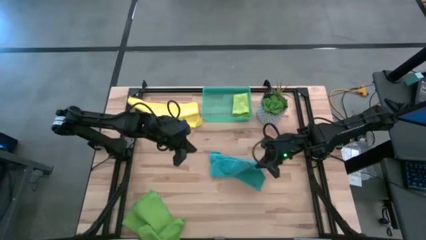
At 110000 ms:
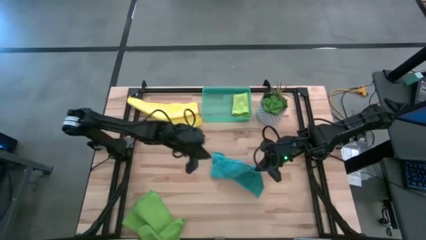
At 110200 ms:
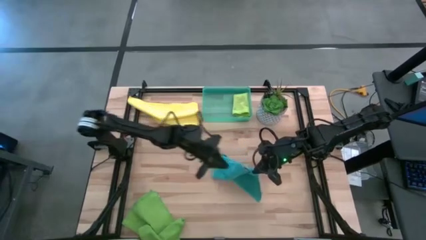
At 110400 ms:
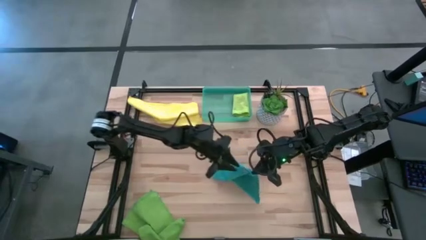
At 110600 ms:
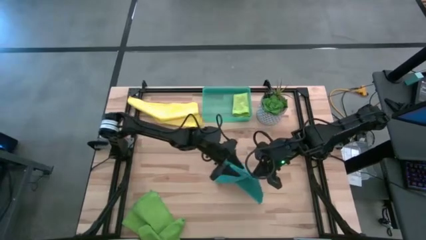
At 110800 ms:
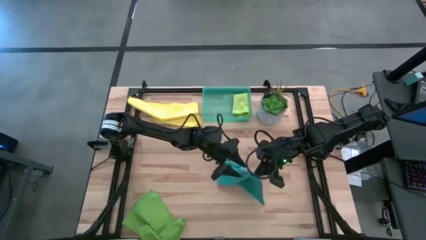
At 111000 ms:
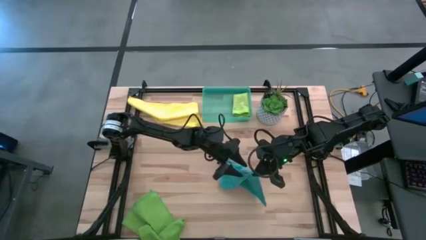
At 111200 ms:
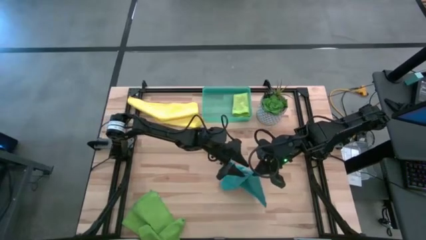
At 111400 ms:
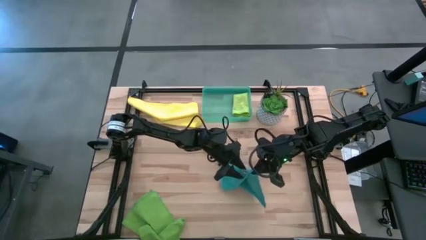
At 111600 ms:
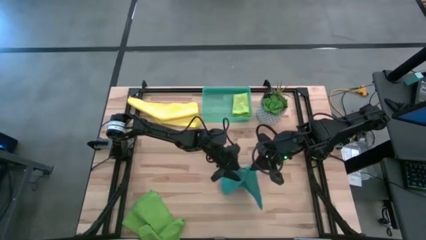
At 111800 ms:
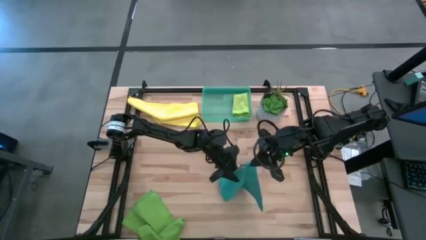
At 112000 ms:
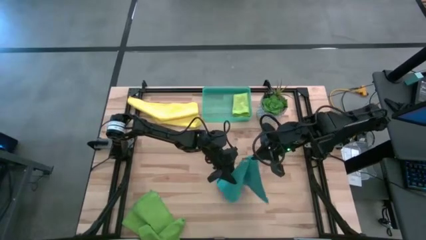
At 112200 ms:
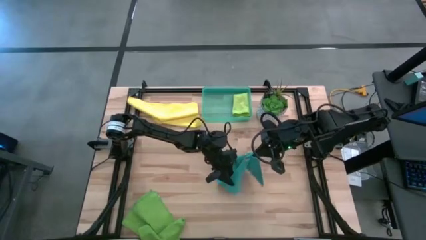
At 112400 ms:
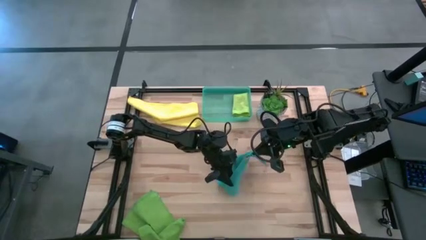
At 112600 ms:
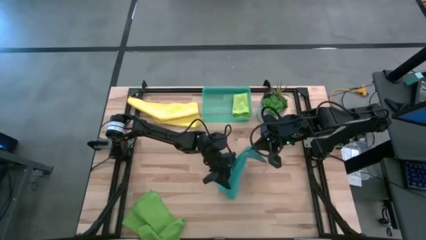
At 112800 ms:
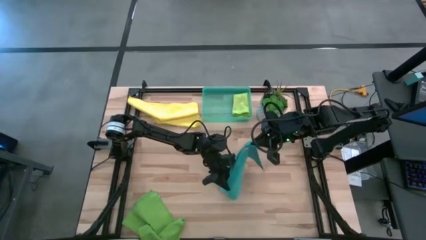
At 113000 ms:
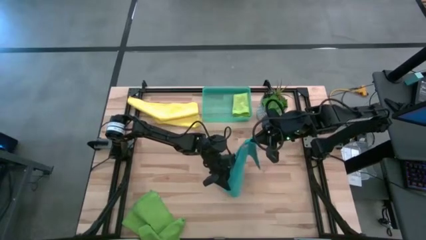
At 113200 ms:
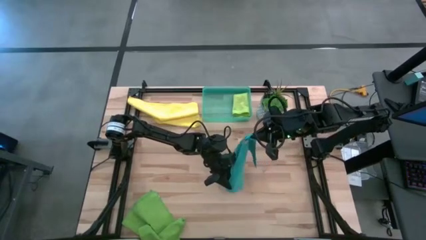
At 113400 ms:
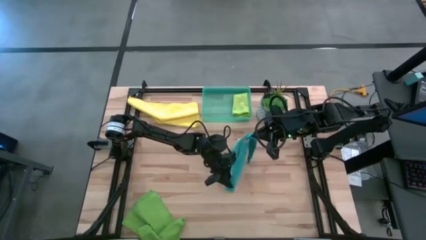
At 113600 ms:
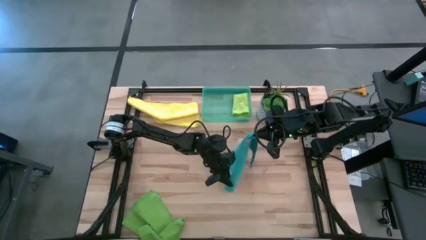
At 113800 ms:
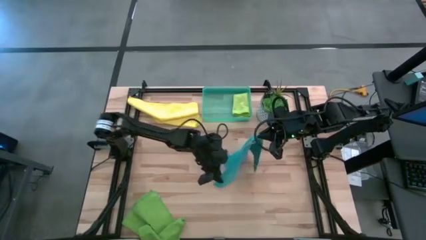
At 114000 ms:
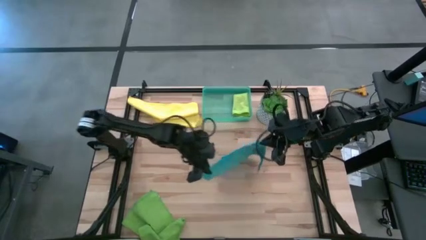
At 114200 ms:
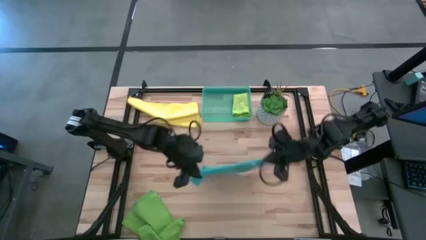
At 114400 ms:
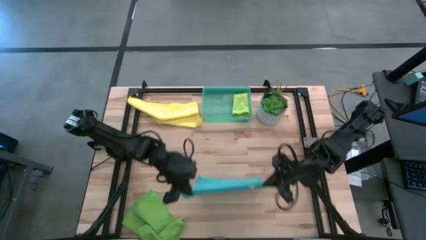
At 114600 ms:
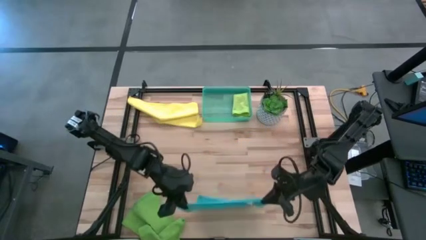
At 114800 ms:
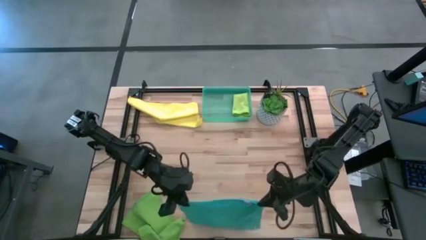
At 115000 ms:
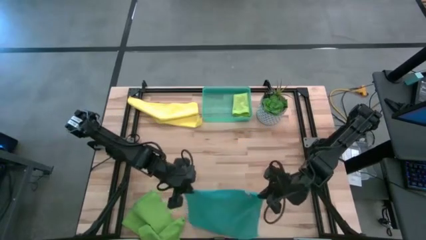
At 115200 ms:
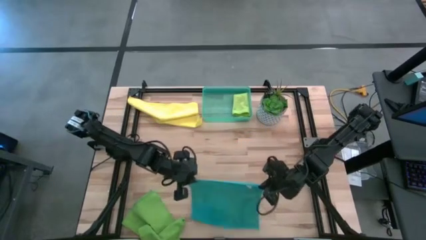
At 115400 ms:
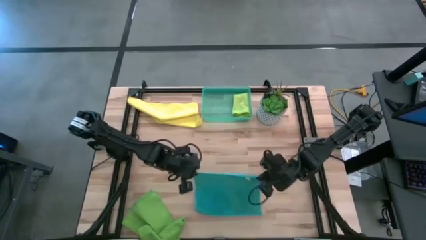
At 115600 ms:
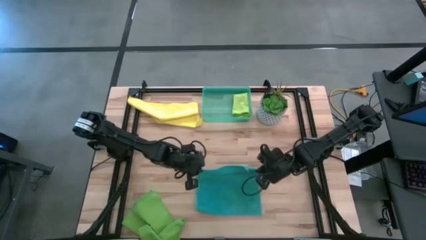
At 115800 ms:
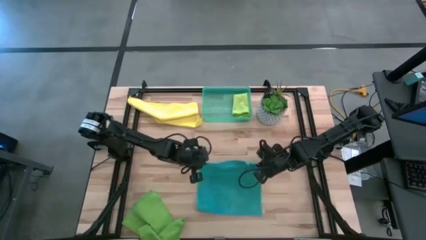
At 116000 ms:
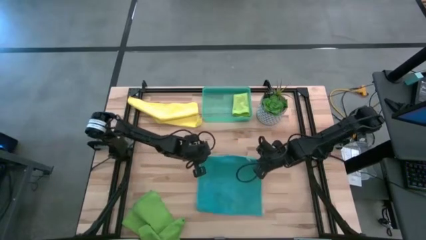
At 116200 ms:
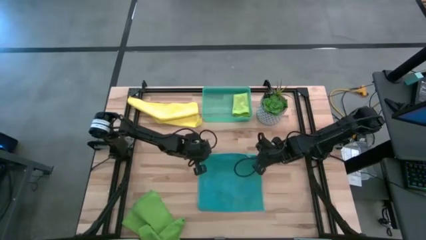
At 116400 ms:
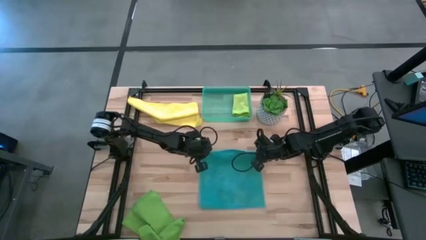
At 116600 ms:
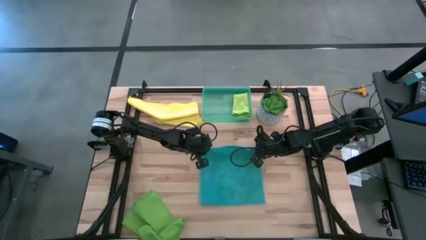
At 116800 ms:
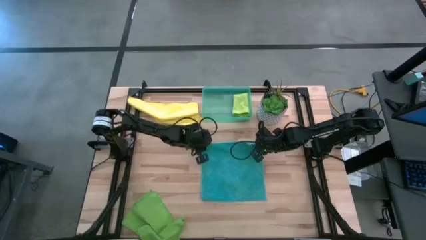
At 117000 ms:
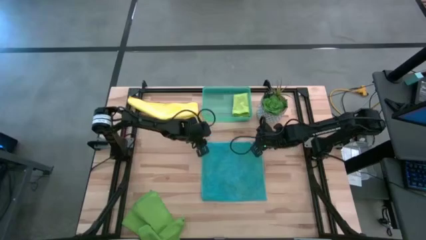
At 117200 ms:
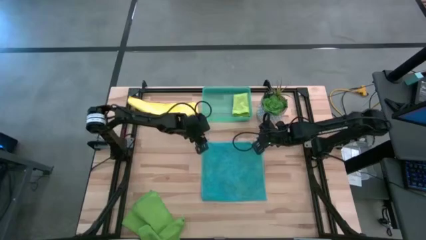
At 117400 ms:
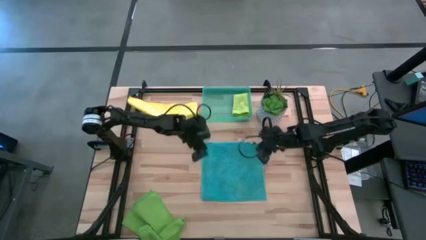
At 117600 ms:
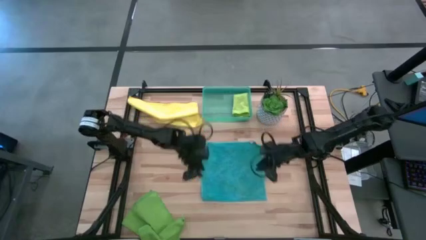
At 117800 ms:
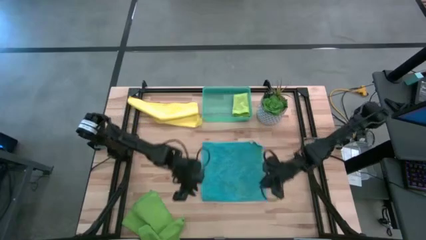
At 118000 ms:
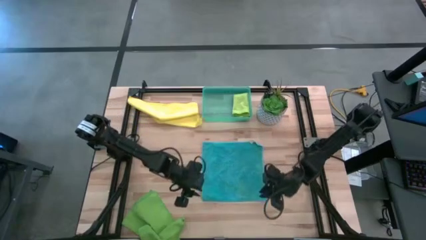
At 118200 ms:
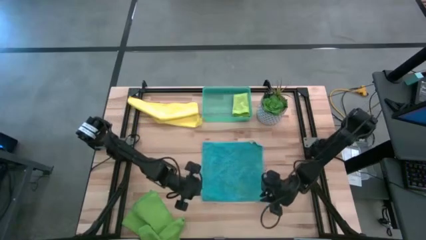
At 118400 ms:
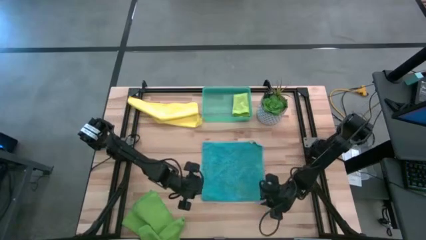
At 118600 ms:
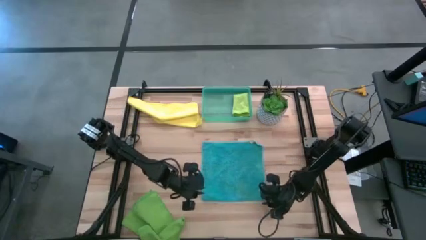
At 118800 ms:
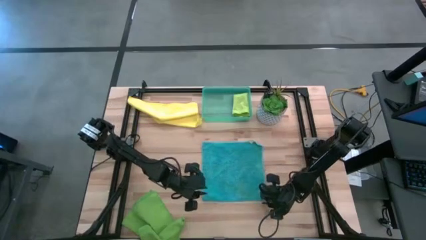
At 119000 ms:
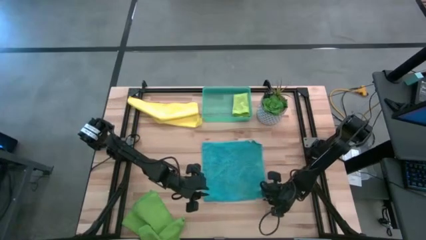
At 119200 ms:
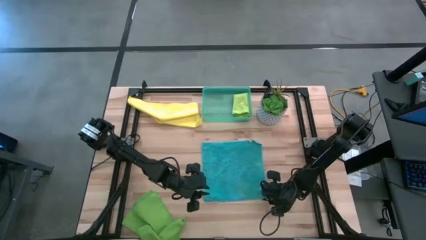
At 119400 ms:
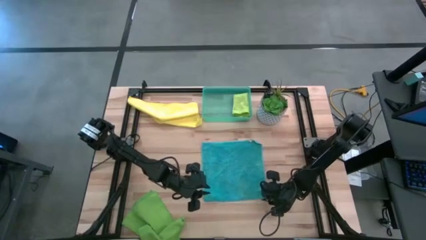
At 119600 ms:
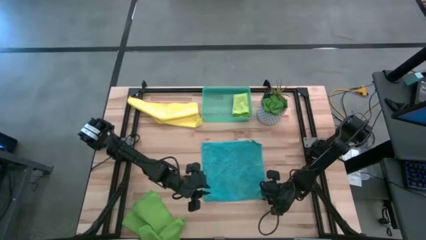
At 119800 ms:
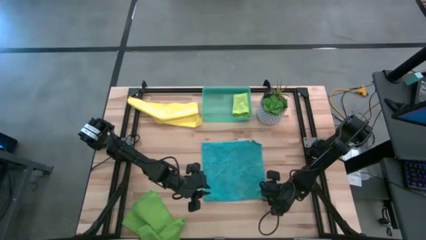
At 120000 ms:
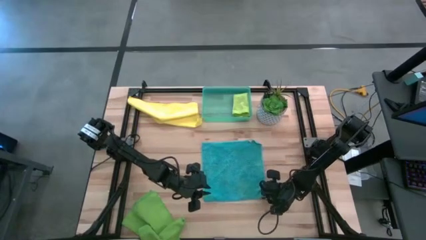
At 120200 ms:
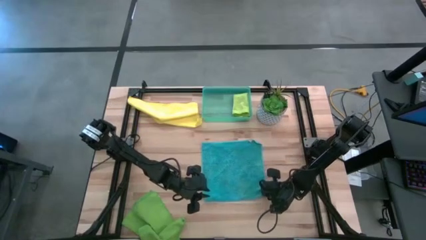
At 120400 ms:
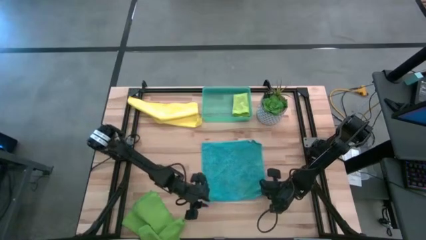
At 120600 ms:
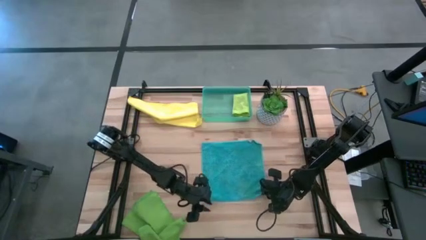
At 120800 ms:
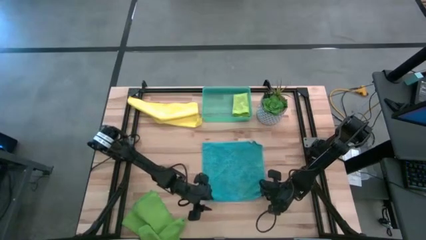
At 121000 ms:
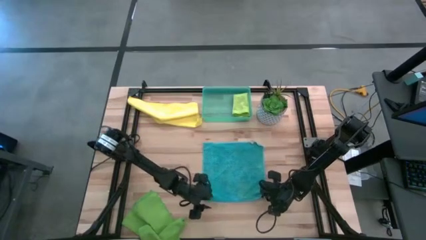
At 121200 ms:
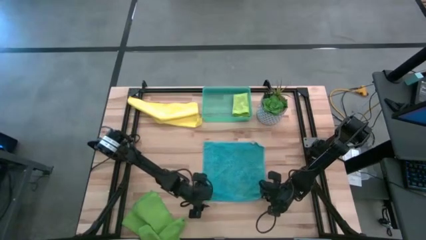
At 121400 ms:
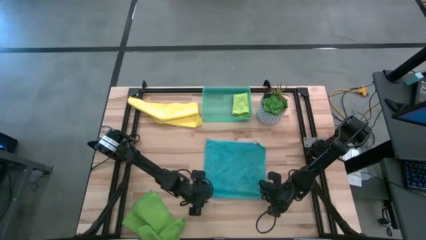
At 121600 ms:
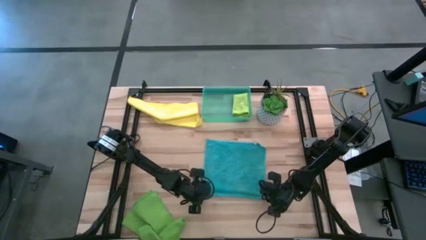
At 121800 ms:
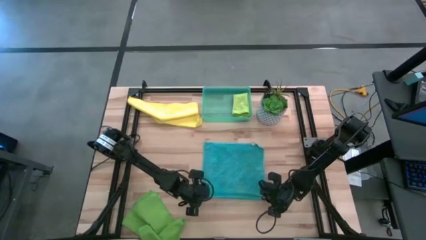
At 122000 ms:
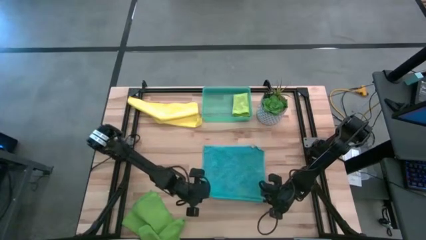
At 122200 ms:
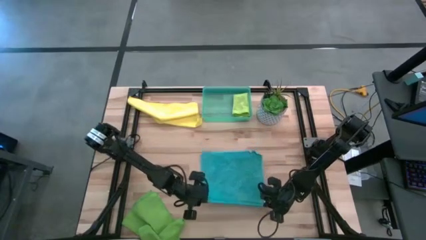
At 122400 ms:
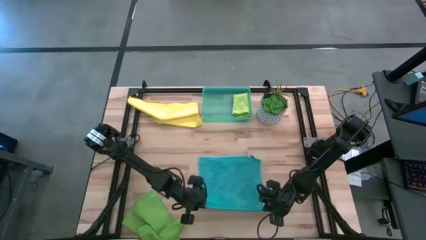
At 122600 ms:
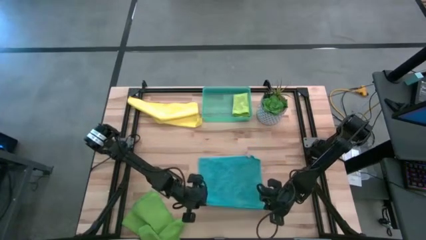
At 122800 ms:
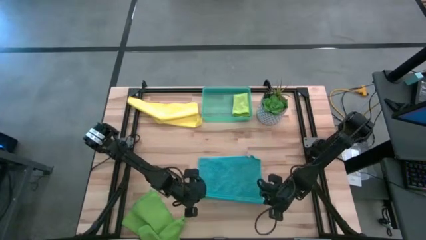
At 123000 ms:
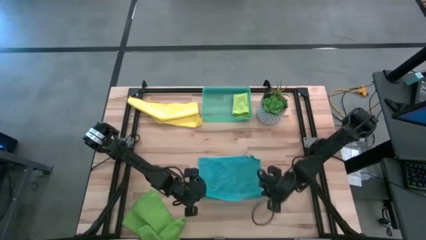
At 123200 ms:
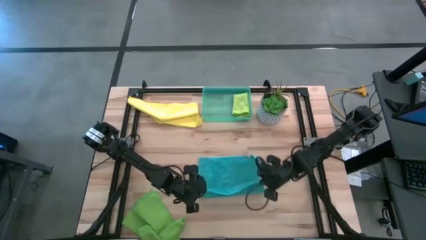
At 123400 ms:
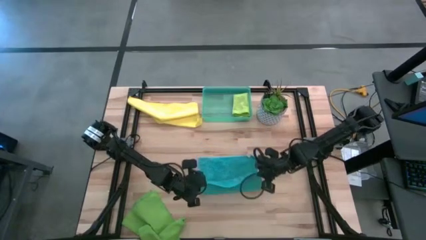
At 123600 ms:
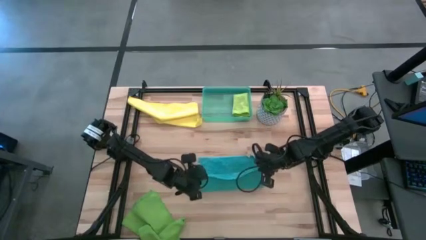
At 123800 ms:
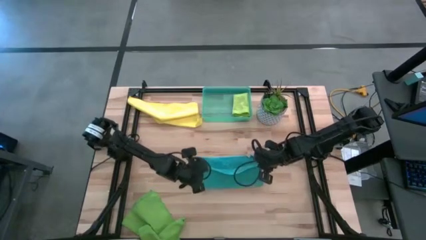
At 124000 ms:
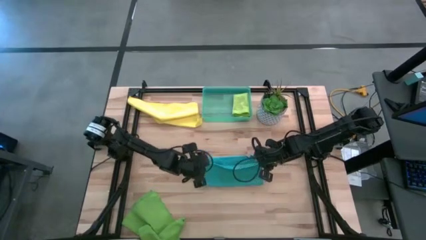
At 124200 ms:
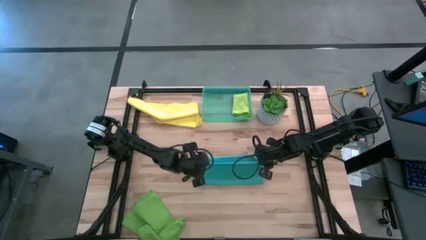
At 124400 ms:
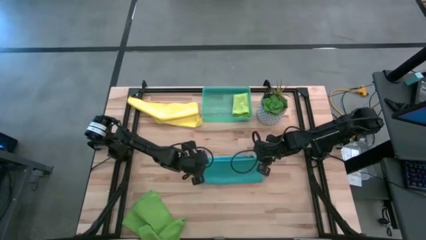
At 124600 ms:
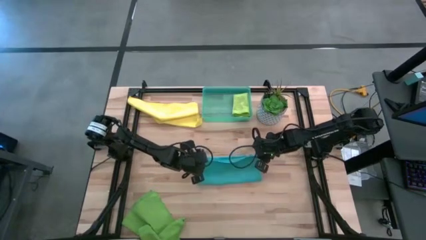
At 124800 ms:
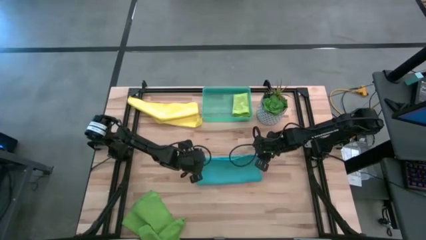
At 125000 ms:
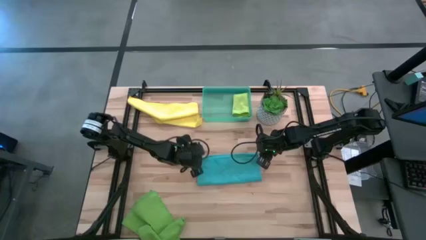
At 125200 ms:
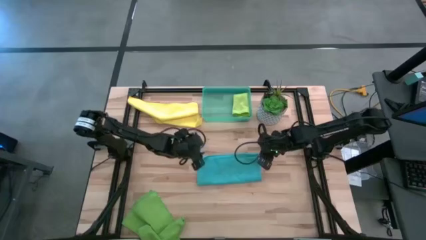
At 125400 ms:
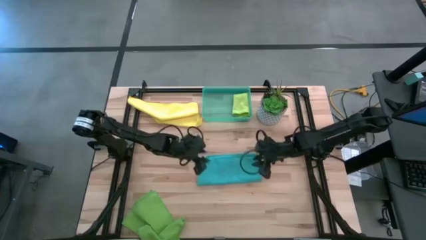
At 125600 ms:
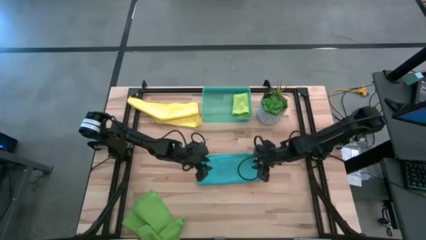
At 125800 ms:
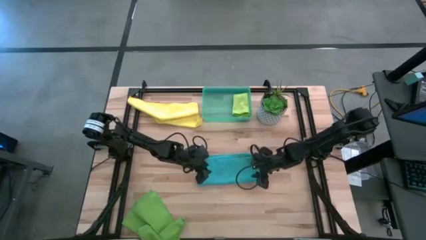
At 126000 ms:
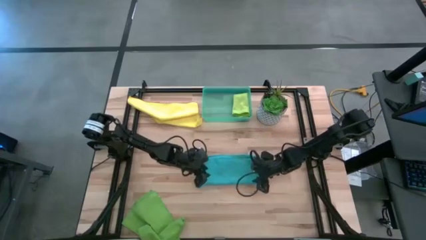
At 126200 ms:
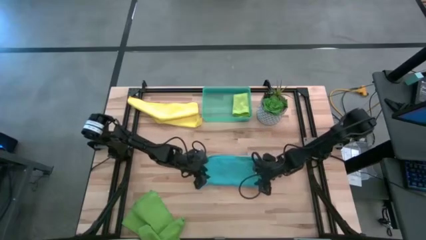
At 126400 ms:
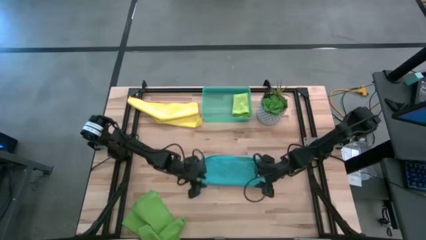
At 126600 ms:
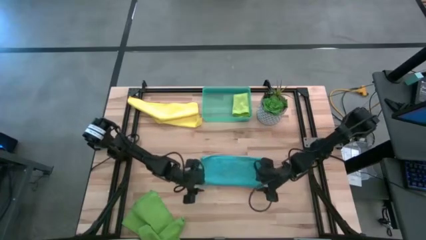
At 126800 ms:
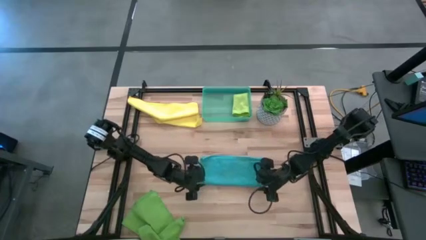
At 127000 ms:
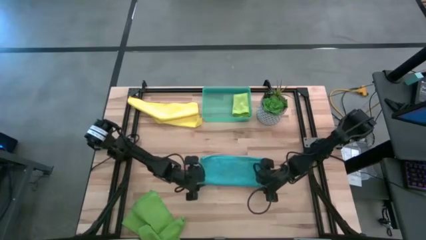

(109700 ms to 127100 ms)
Task: Fold microfiber towels
Fold the blue microfiber cloth
